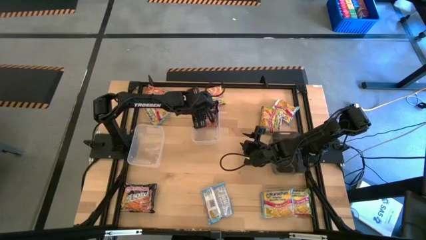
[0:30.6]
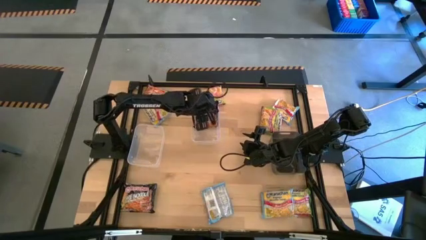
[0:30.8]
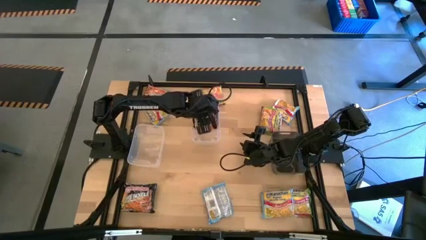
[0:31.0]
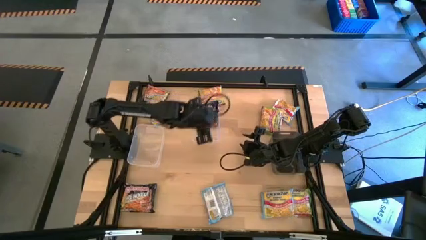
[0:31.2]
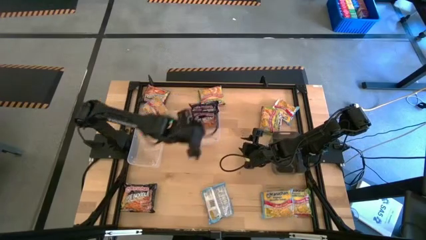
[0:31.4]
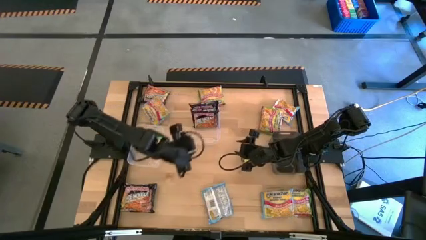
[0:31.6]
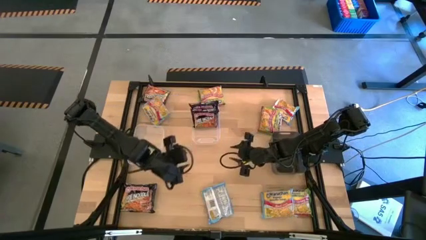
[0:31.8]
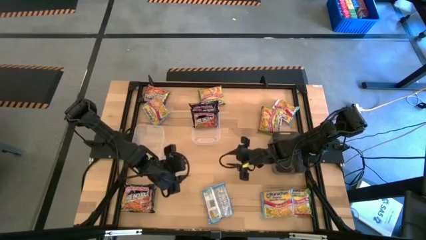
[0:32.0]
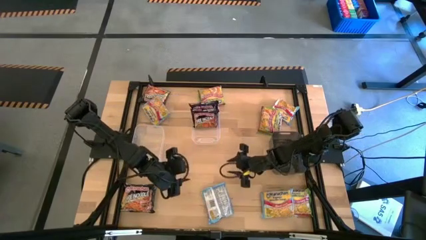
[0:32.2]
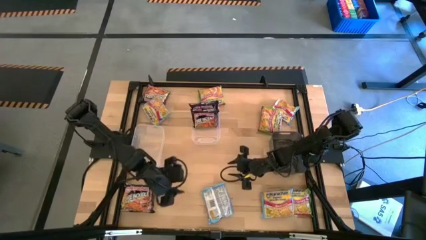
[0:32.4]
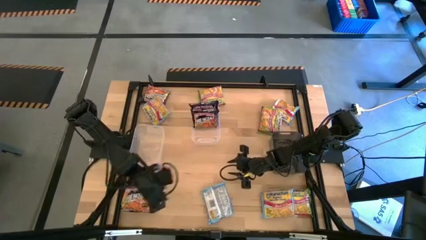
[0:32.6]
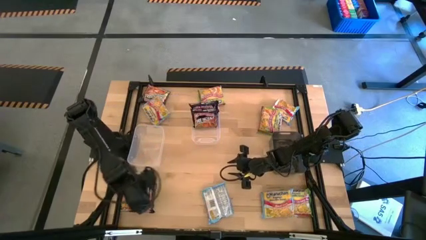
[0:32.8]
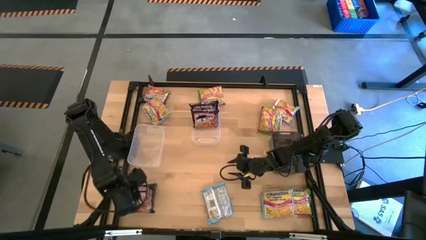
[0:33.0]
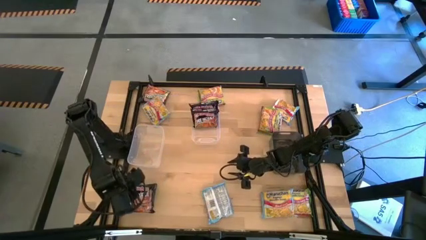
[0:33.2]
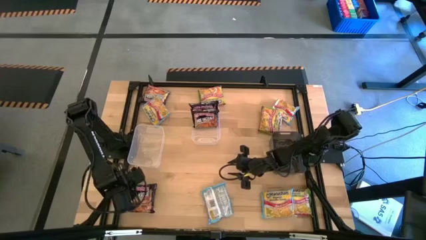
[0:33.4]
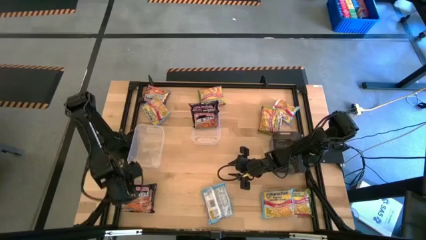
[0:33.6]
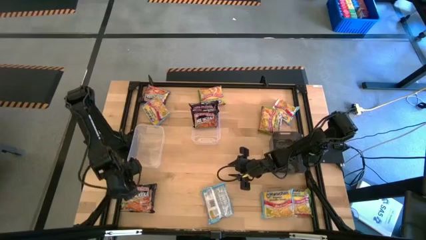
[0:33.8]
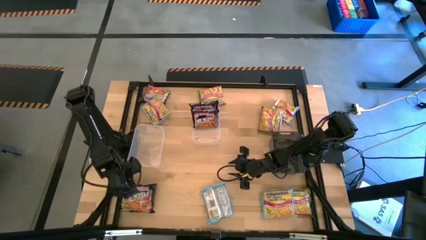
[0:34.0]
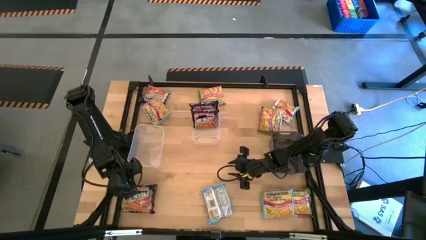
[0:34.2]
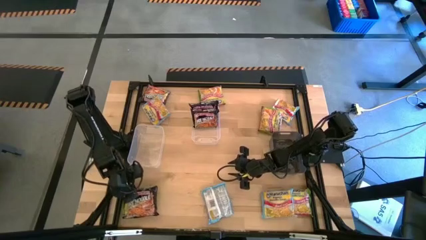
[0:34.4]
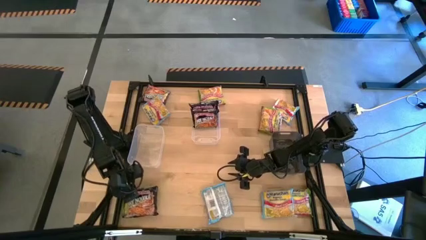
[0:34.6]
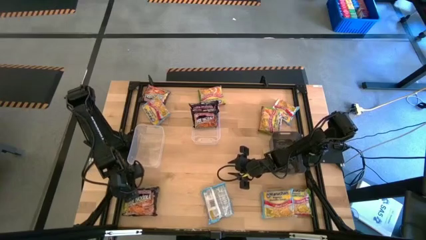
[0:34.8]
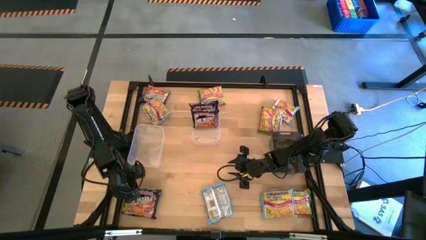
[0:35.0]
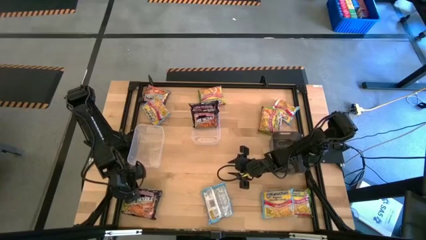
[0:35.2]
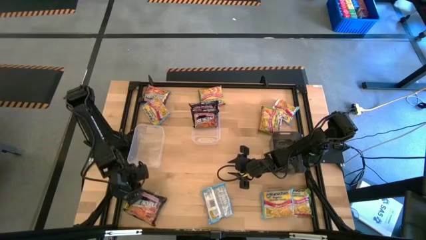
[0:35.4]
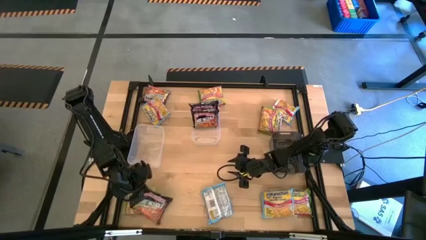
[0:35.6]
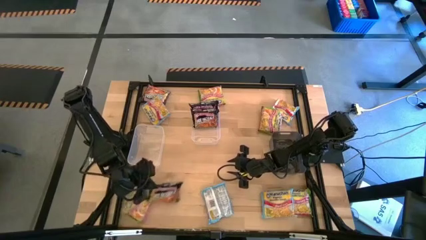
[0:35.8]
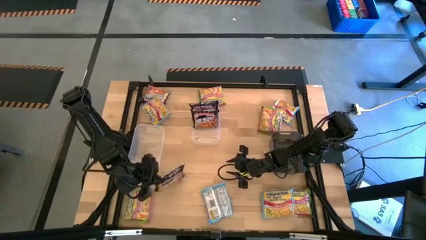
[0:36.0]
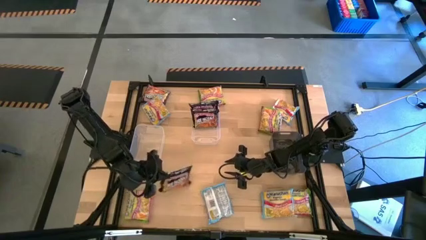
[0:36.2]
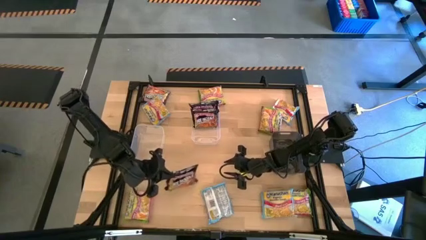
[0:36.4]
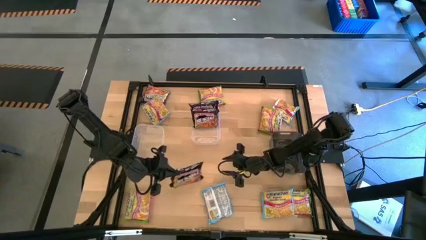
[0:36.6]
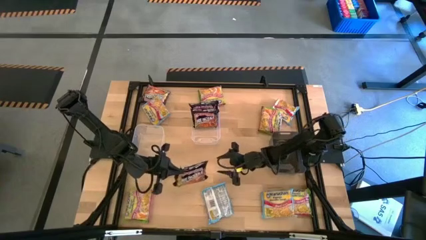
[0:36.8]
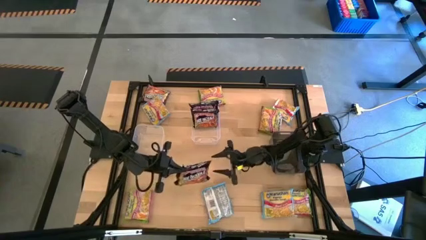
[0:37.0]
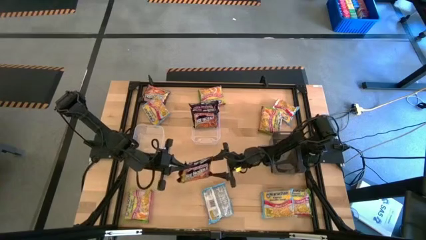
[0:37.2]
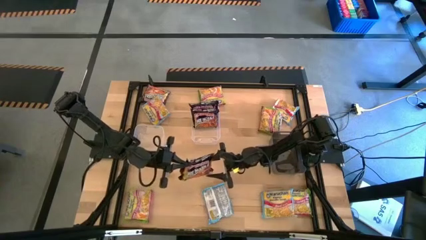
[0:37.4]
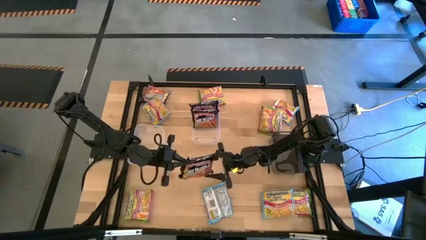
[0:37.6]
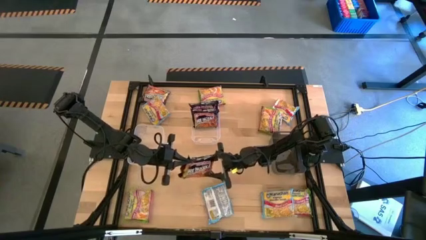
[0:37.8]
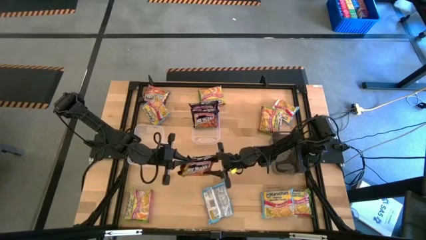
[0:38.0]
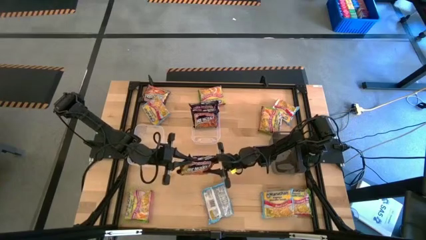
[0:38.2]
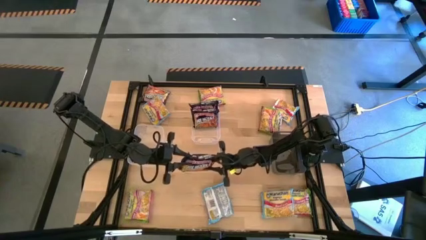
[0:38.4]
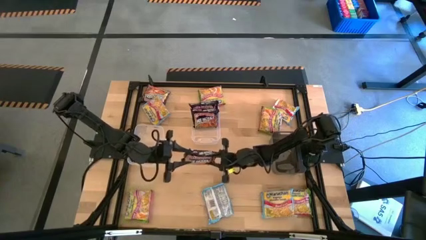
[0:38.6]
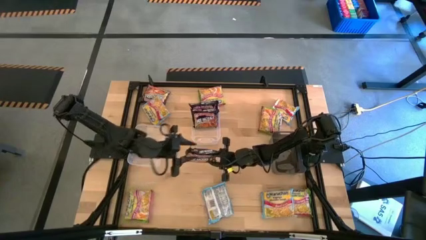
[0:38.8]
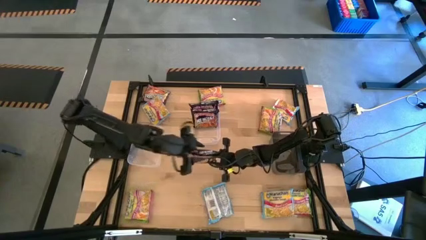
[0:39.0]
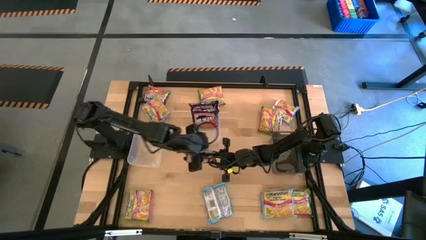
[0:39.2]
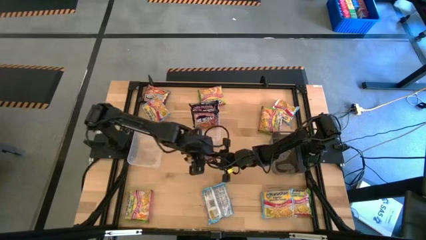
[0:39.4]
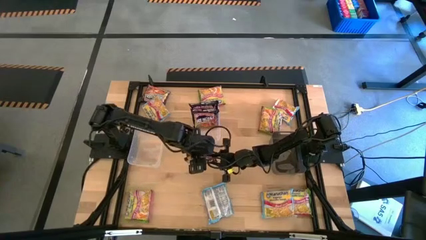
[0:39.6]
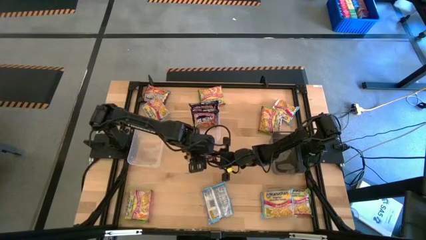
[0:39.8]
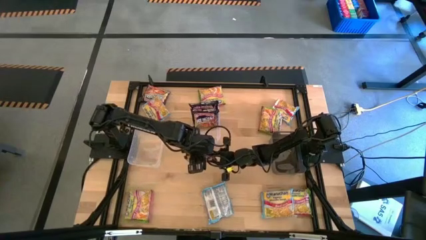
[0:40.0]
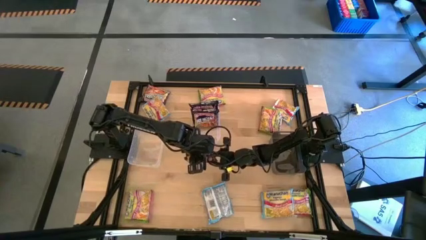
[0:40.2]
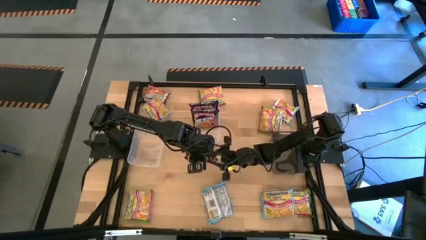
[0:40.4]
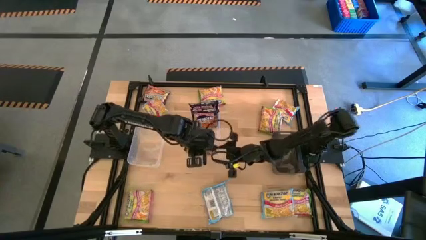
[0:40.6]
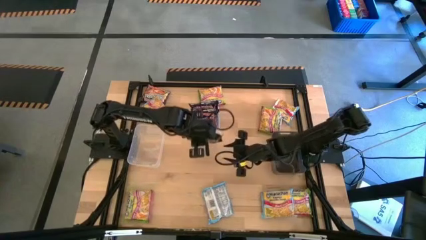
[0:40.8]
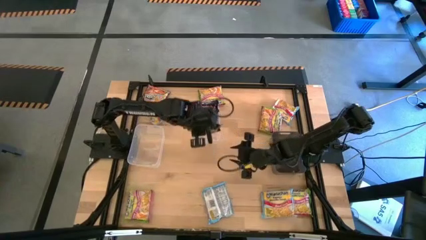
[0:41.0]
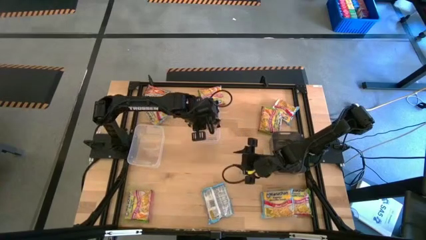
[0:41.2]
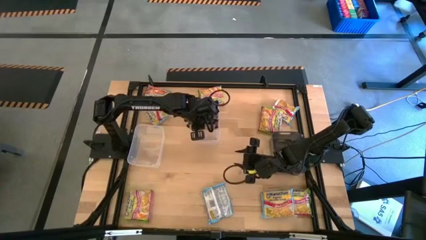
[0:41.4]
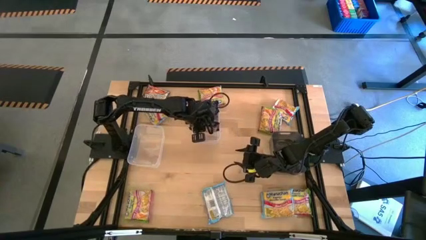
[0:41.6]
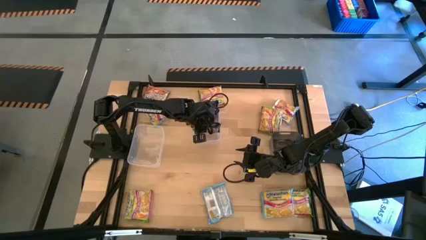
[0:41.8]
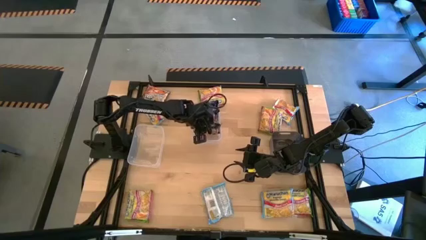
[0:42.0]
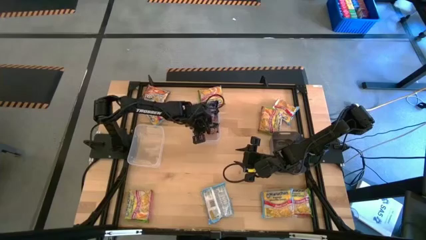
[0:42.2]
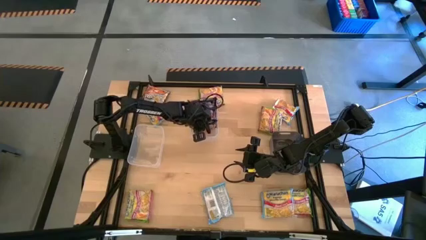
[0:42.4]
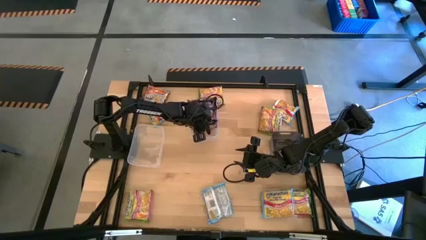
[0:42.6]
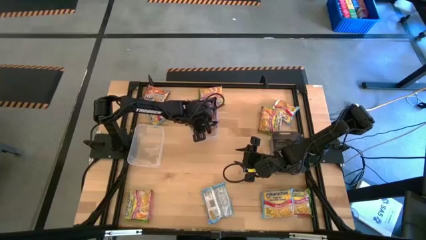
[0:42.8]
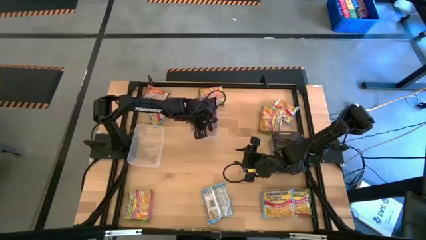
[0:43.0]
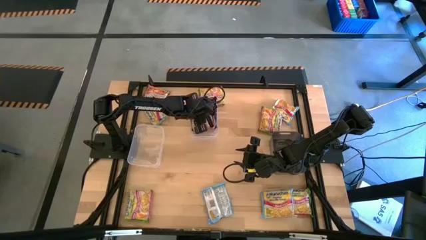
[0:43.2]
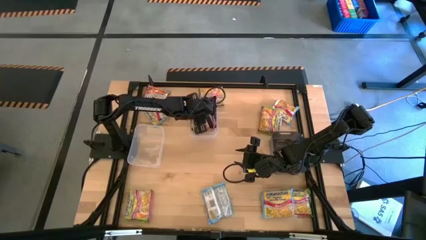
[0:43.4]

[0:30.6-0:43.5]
Task: Sort Maruchan noodles
Put the black noodle pack into the right transparent bin
